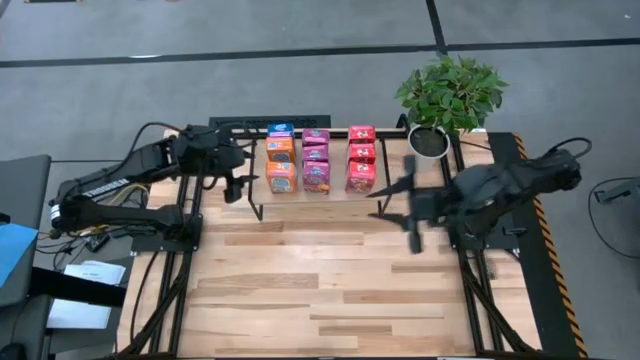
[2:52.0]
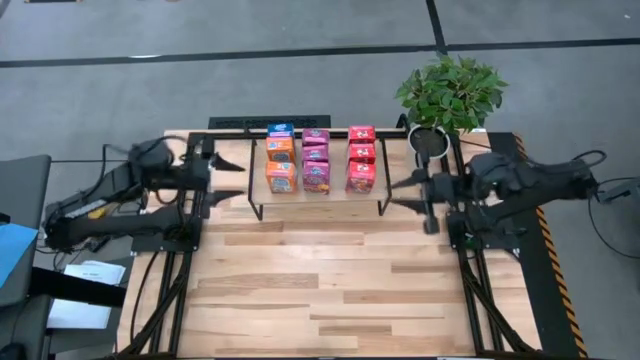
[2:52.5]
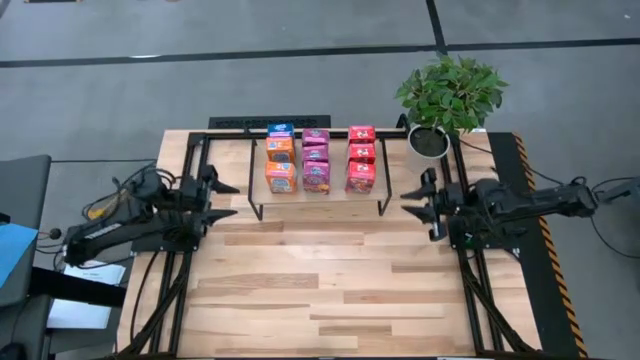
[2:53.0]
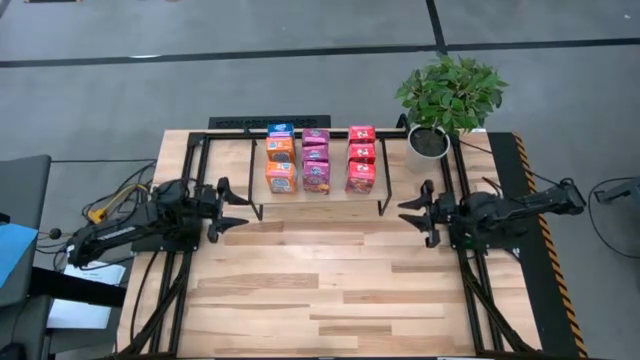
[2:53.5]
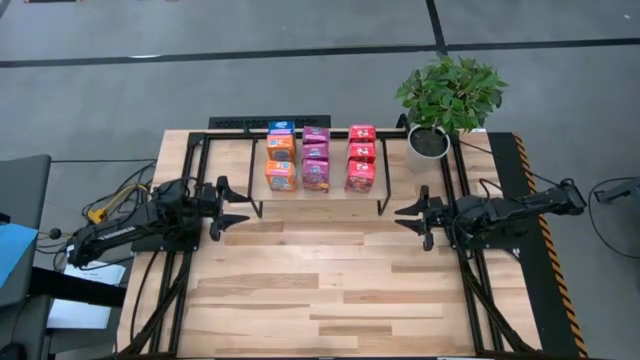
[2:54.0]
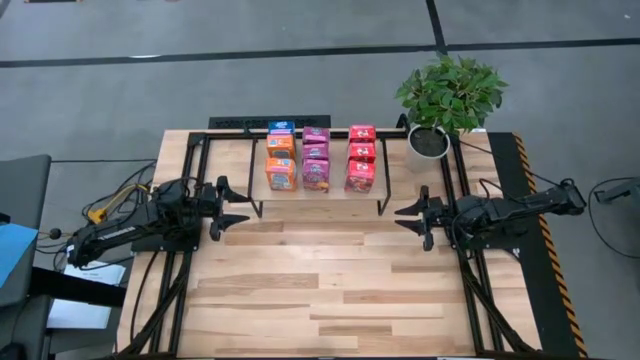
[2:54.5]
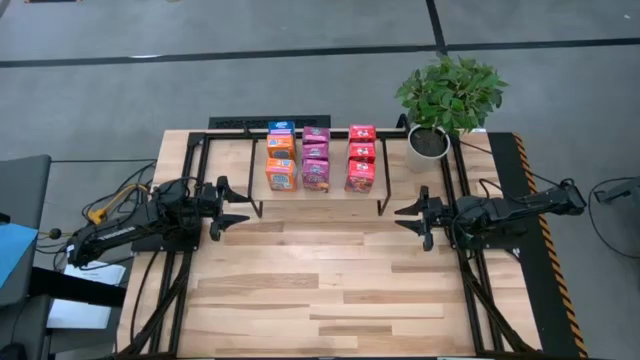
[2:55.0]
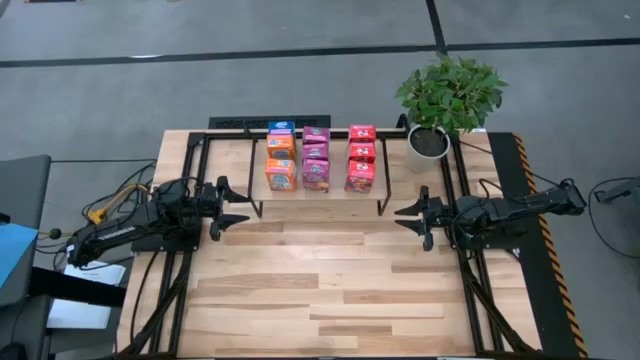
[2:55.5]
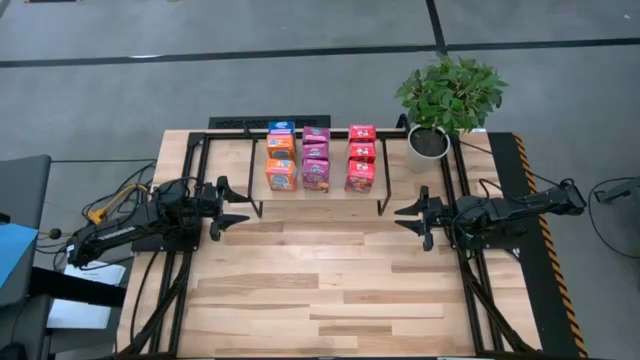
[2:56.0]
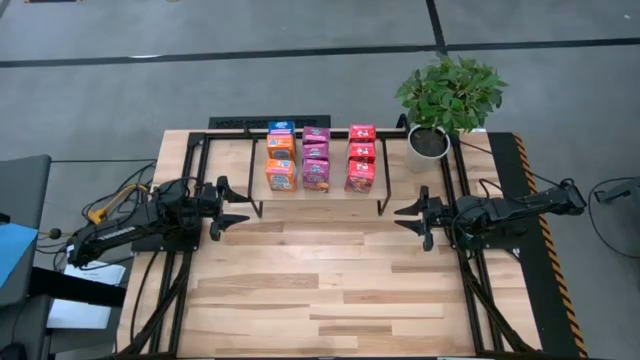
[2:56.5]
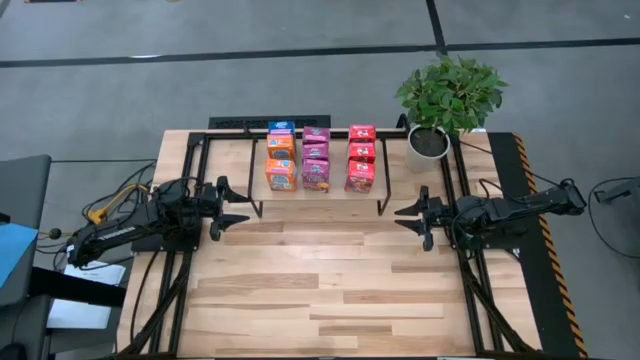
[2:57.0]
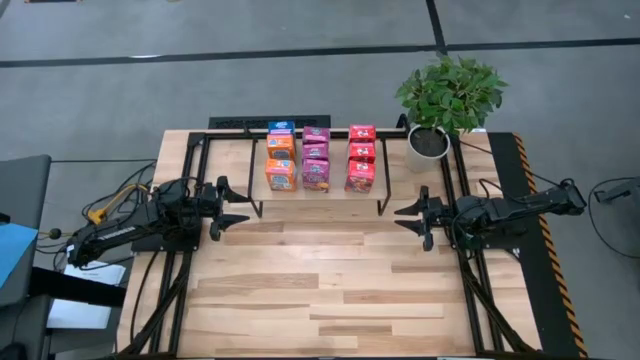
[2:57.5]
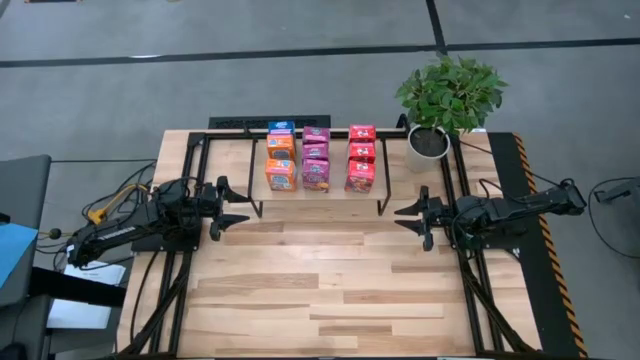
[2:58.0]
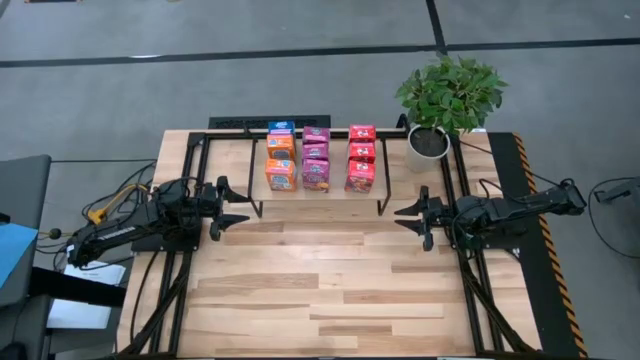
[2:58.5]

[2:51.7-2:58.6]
Task: Stack cereal on shelf
Return to Home Position

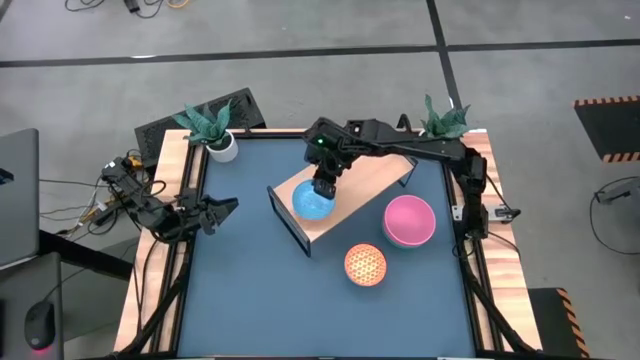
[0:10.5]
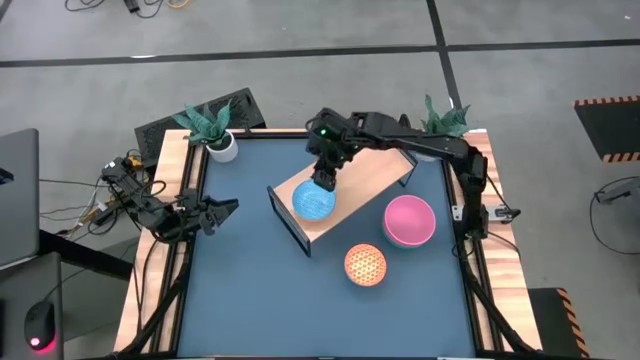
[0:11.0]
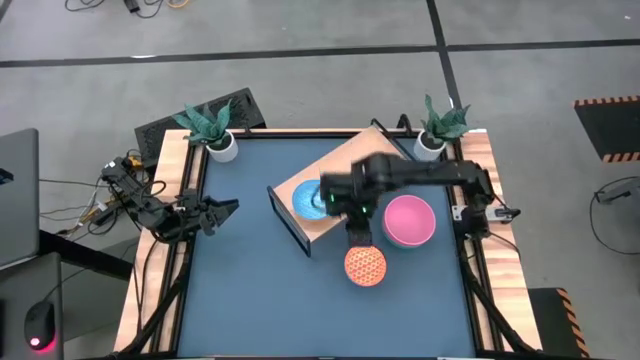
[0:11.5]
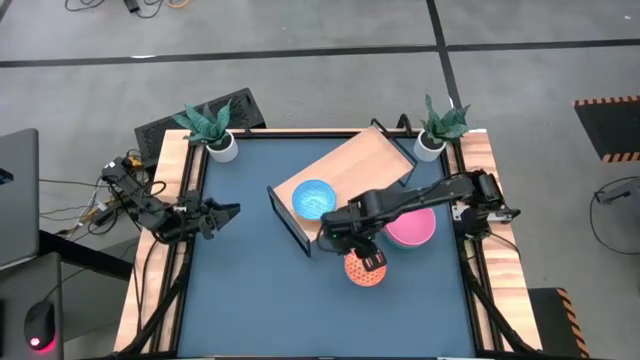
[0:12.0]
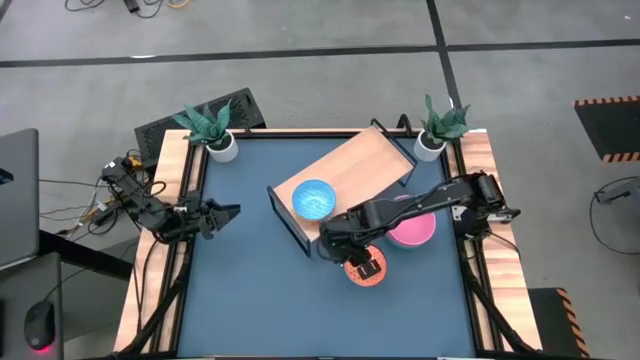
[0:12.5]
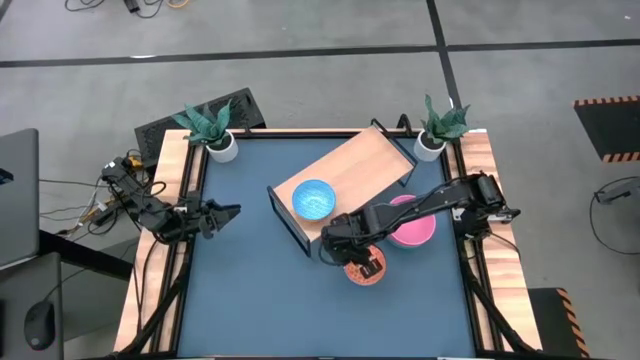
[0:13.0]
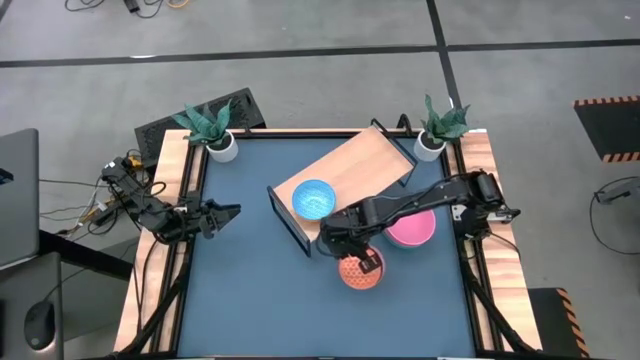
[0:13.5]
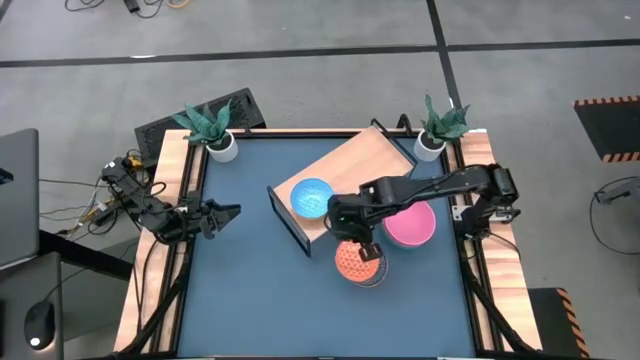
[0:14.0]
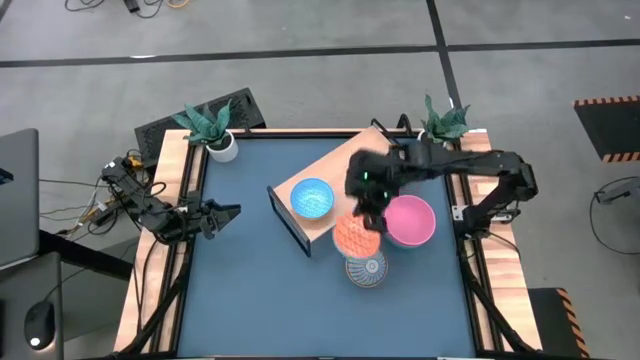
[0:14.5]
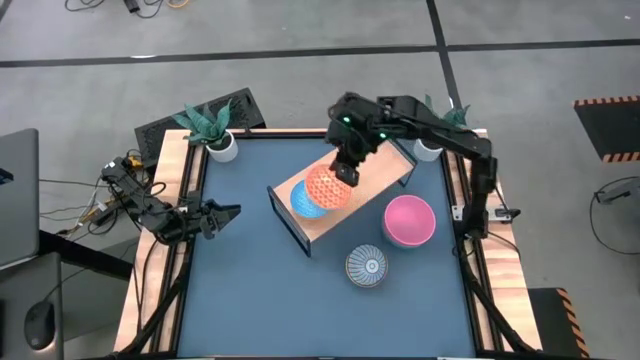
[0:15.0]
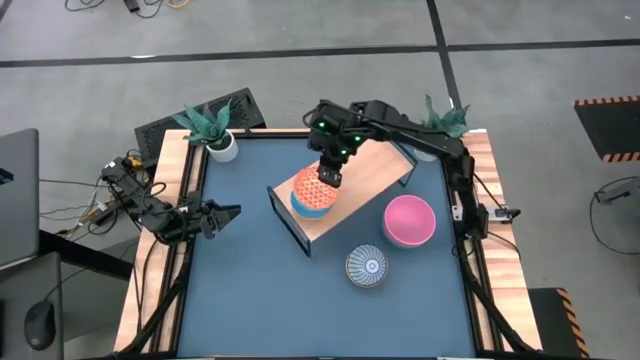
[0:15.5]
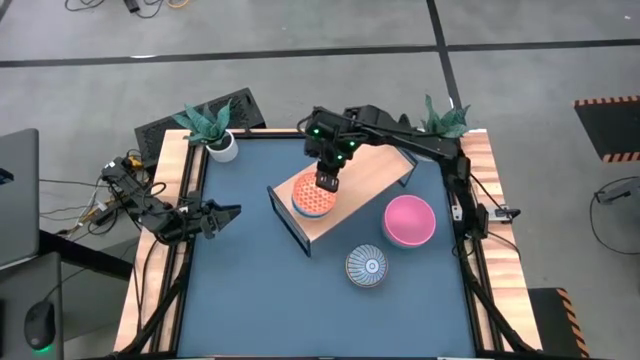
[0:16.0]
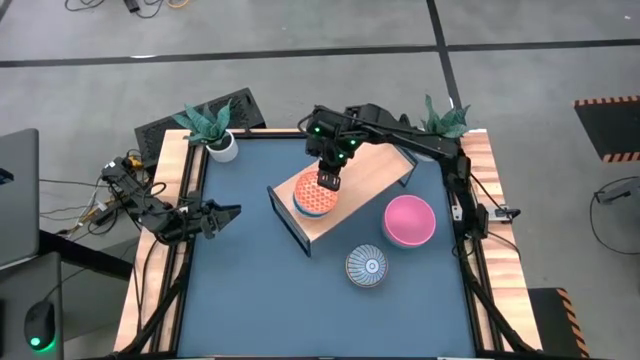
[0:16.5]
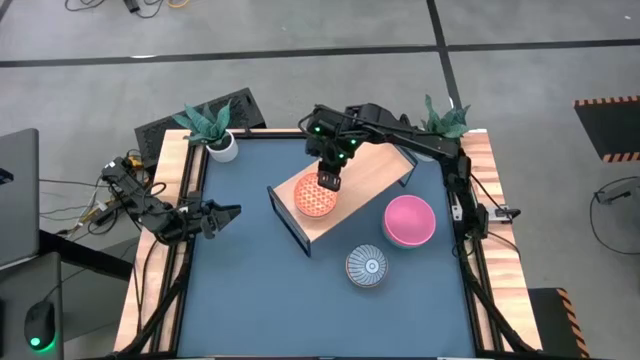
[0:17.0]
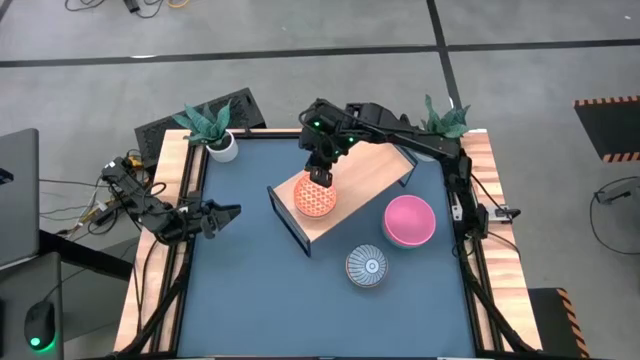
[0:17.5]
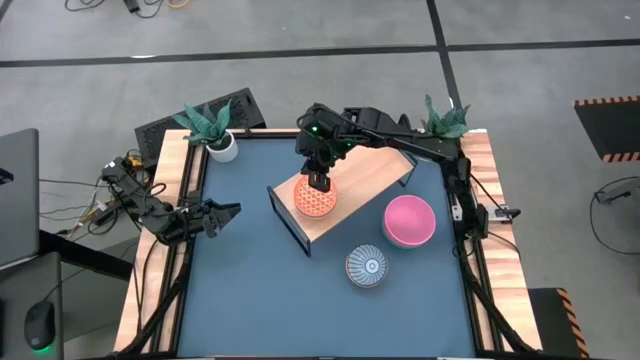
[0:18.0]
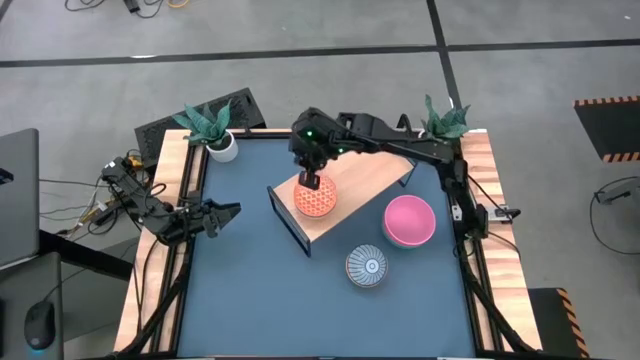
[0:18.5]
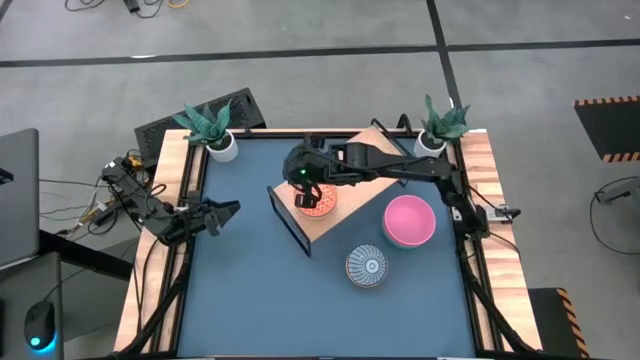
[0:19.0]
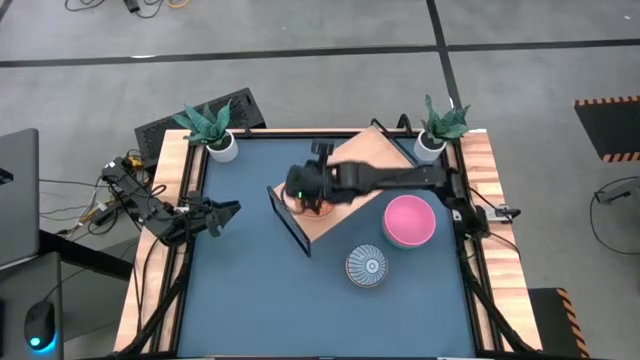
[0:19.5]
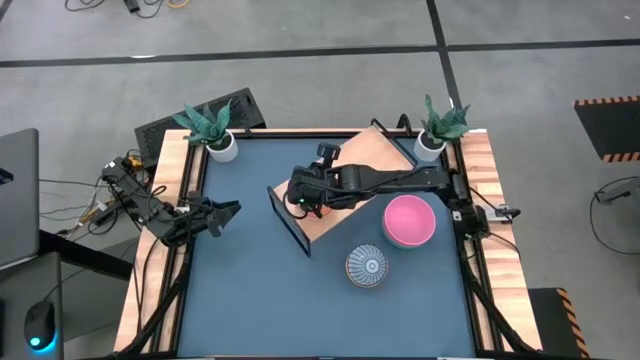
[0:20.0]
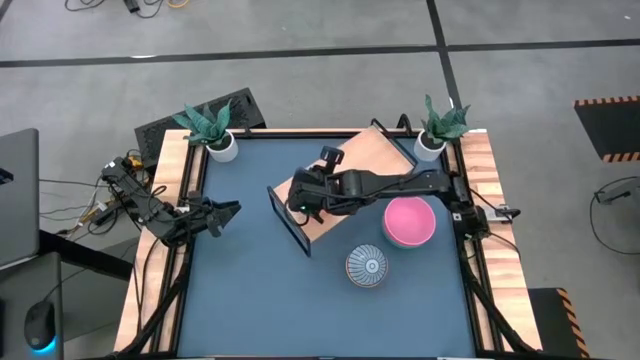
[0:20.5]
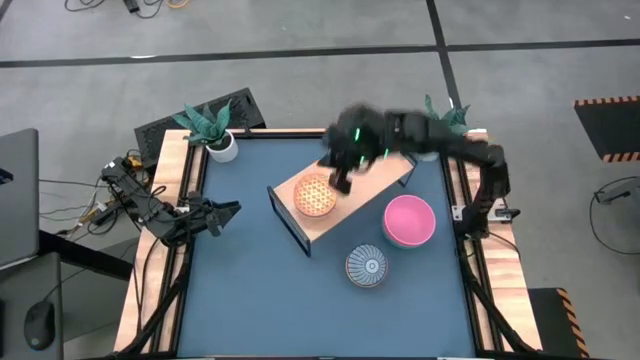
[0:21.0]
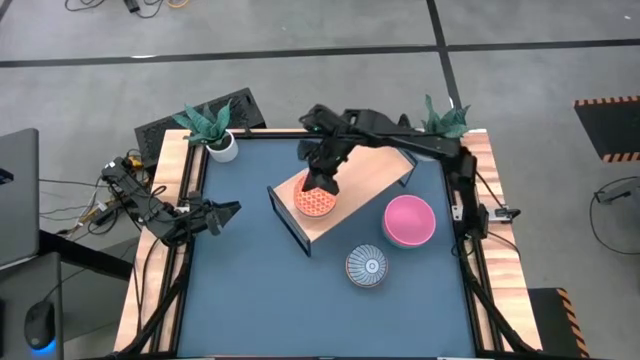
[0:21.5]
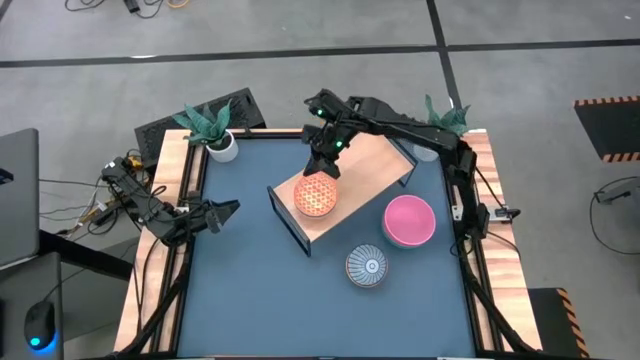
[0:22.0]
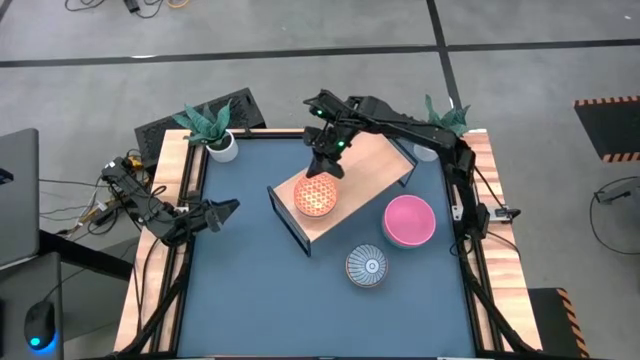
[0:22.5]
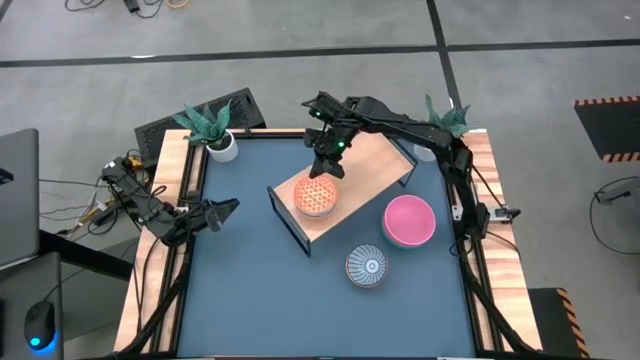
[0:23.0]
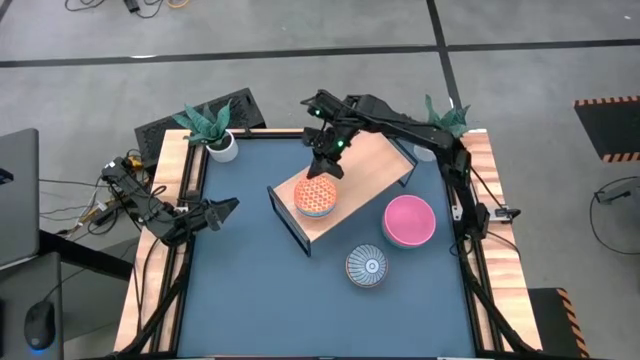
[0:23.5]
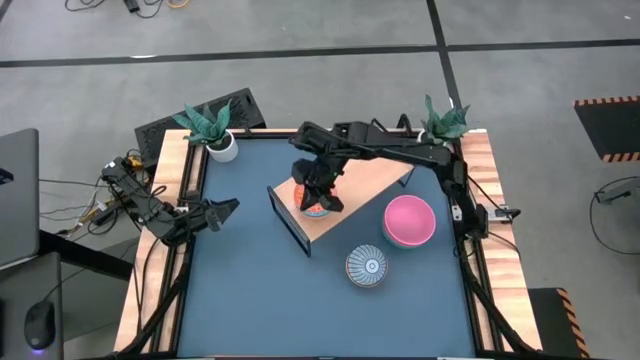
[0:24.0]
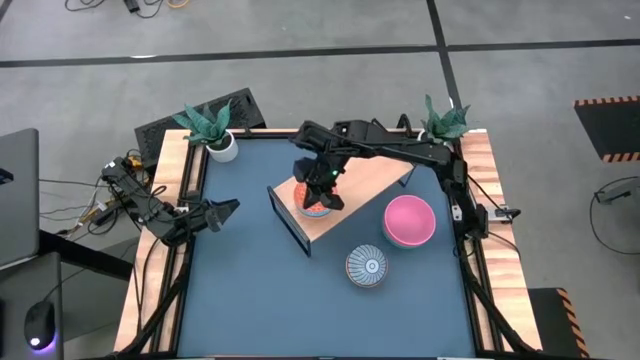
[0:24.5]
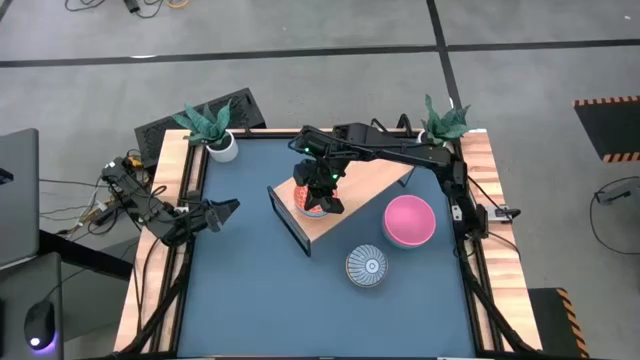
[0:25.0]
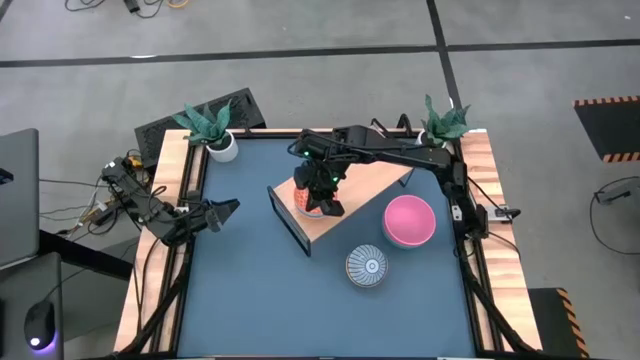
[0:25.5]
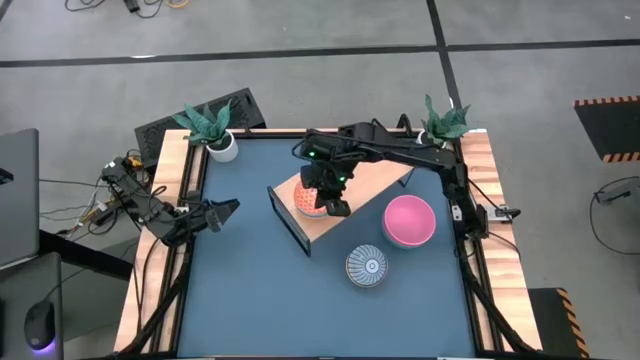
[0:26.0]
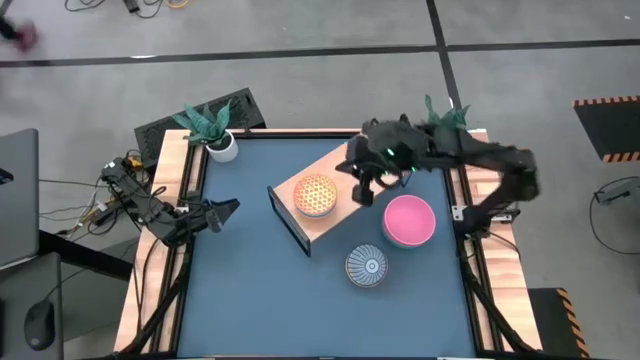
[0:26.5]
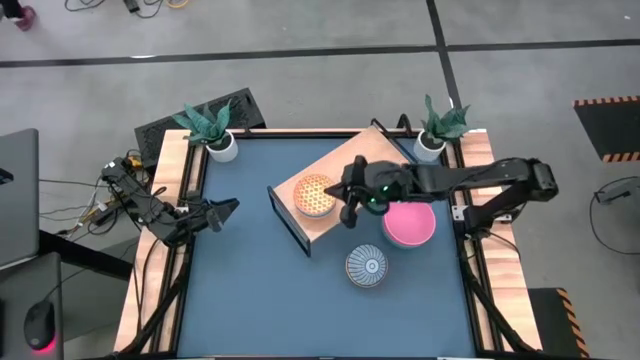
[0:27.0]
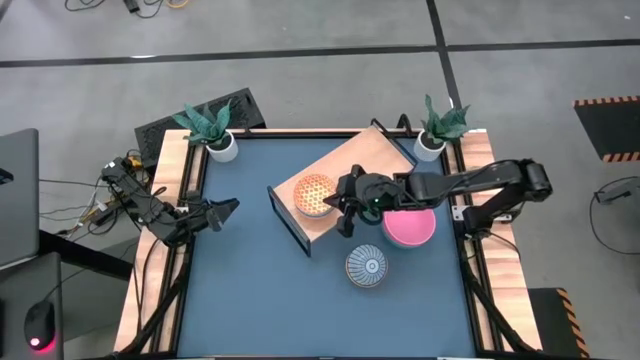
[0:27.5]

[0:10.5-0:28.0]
Task: Place and stack bowls onto a shelf
Stack the orange patterned bowl on top of the blue patterned bowl on the shelf
